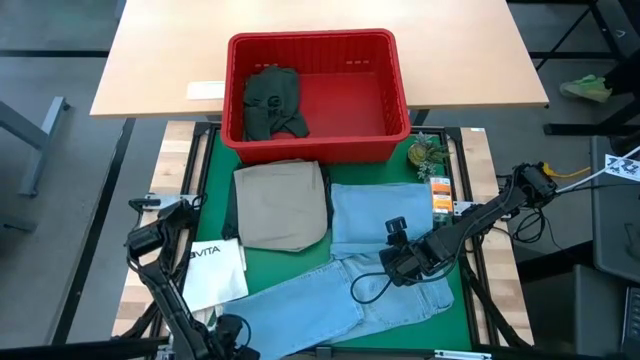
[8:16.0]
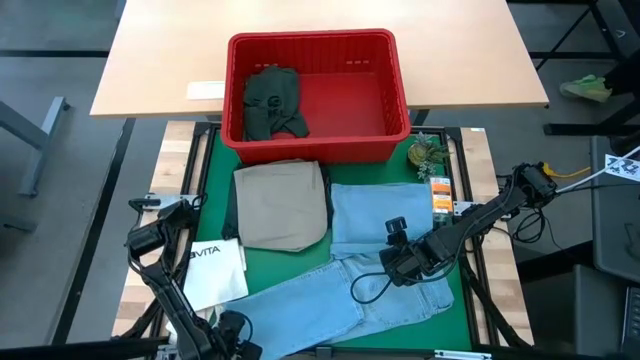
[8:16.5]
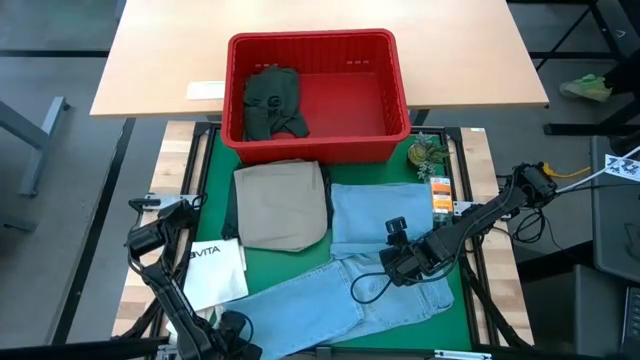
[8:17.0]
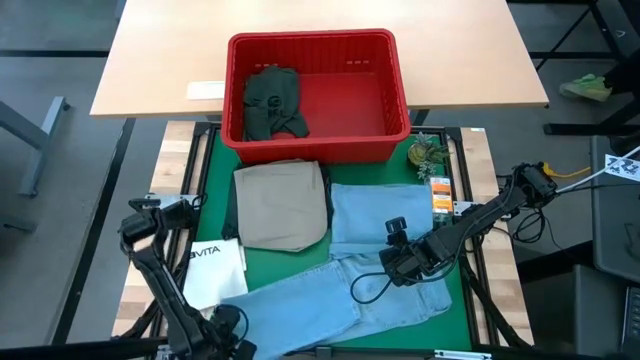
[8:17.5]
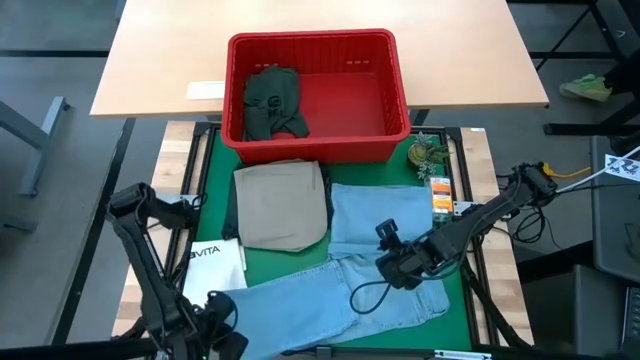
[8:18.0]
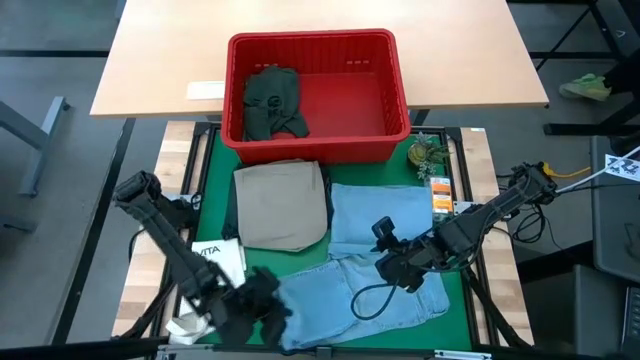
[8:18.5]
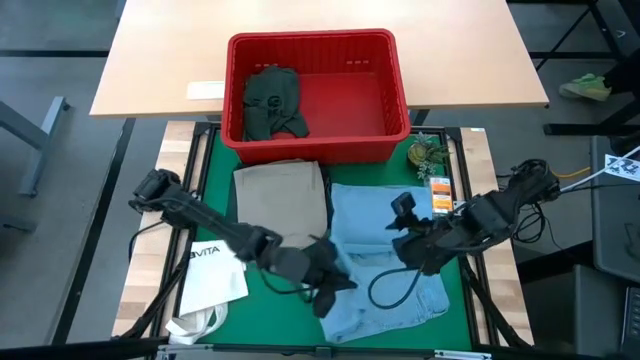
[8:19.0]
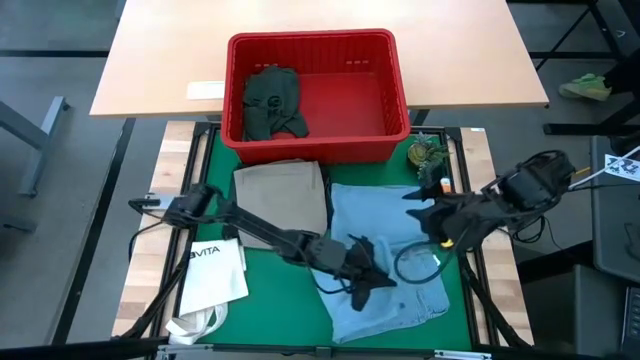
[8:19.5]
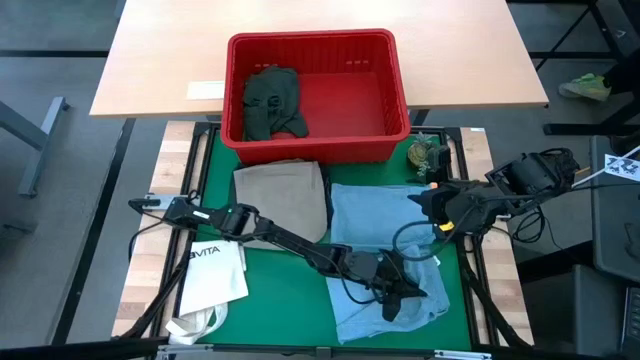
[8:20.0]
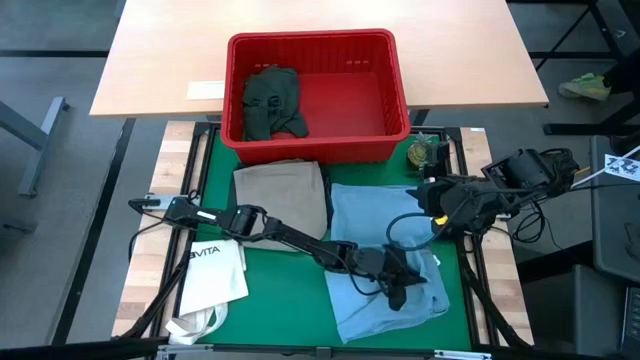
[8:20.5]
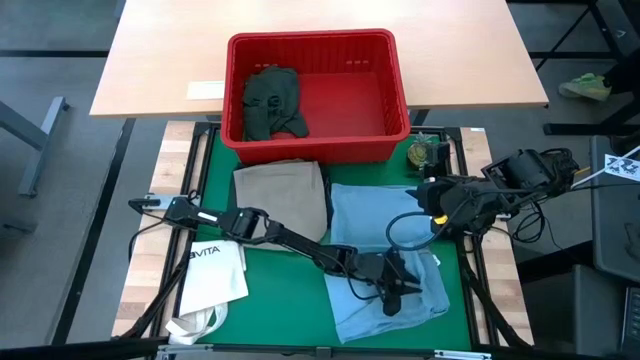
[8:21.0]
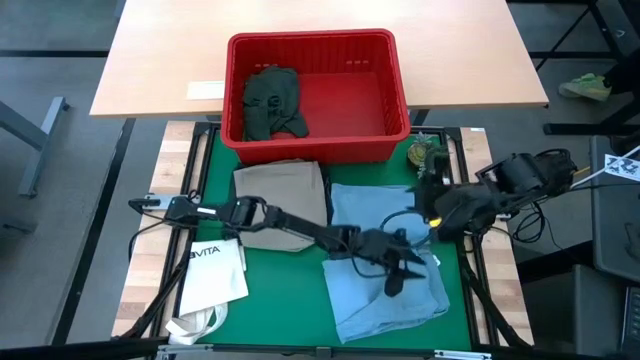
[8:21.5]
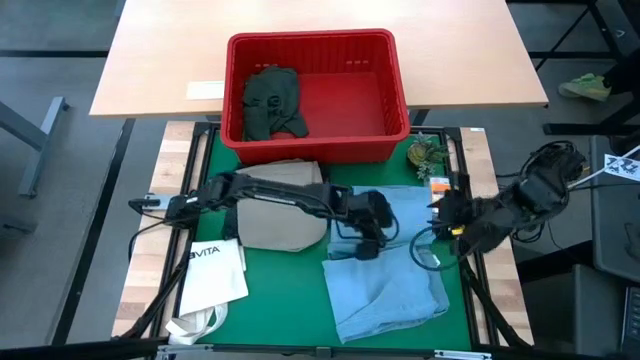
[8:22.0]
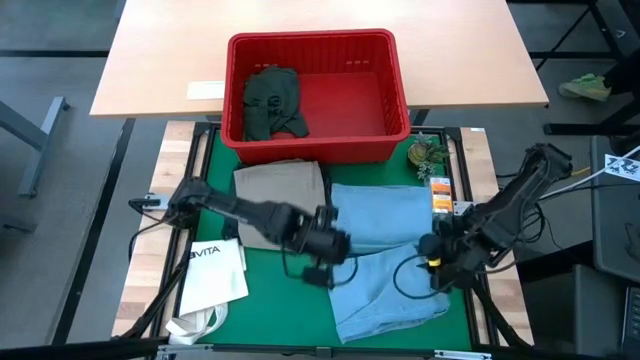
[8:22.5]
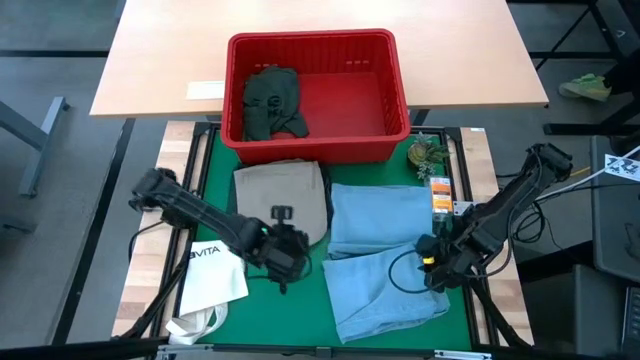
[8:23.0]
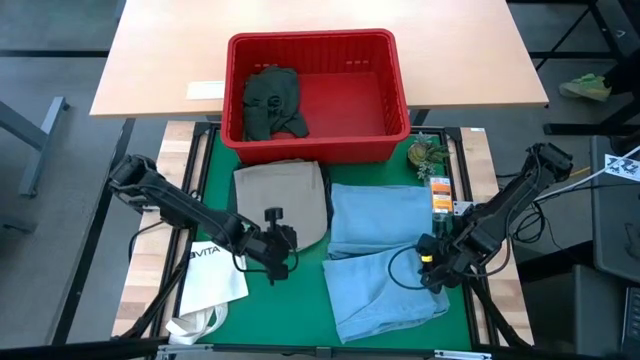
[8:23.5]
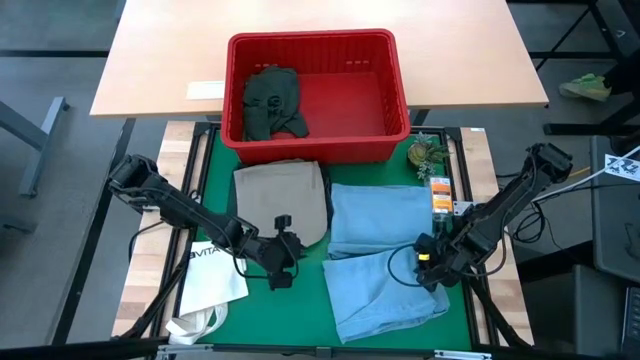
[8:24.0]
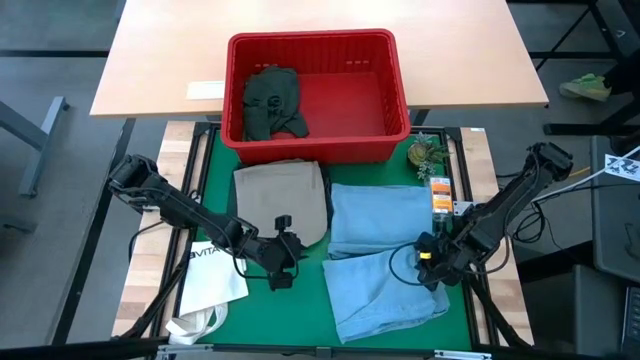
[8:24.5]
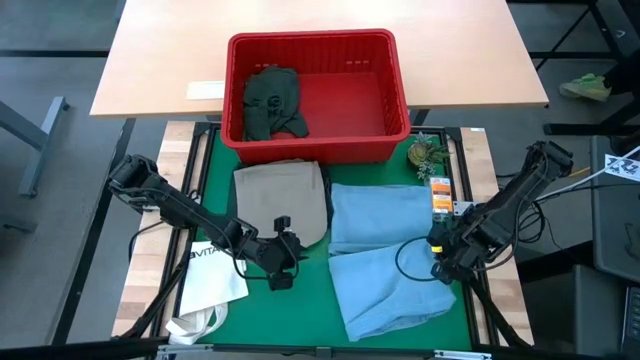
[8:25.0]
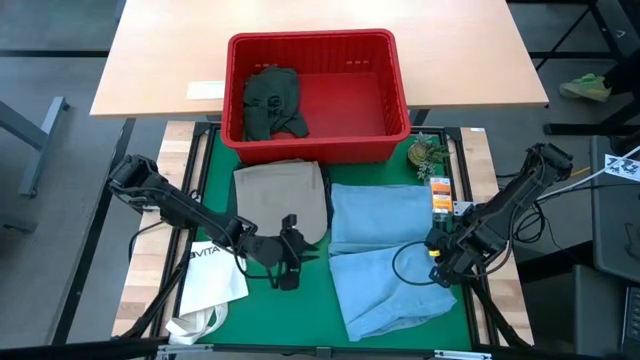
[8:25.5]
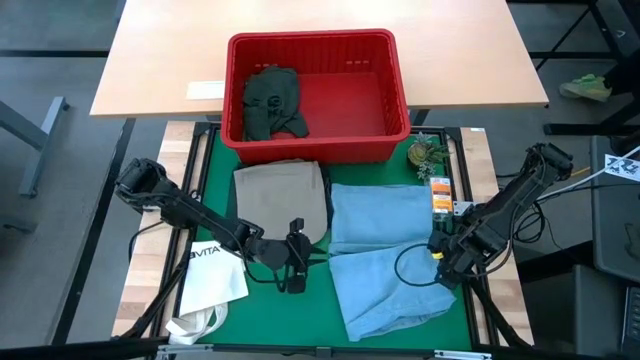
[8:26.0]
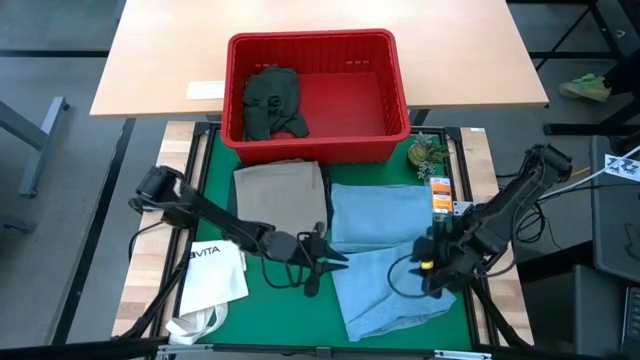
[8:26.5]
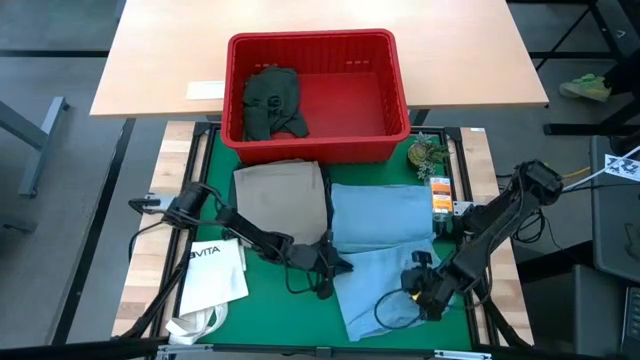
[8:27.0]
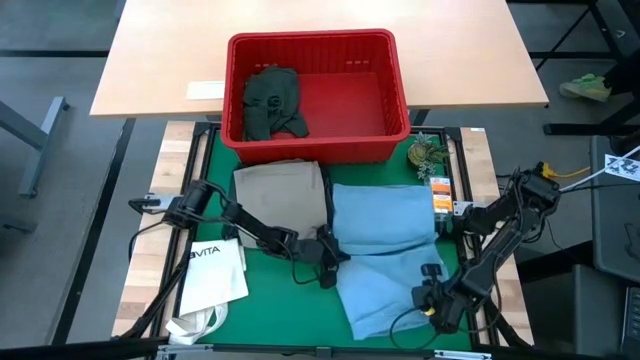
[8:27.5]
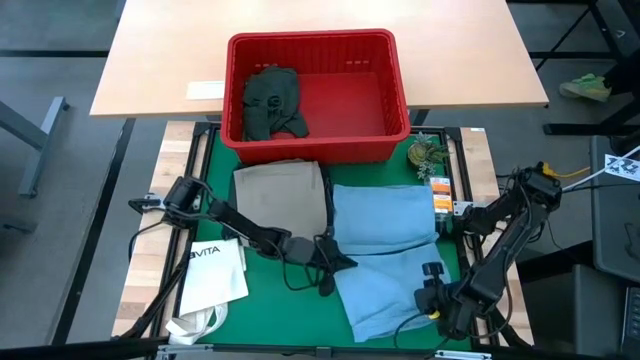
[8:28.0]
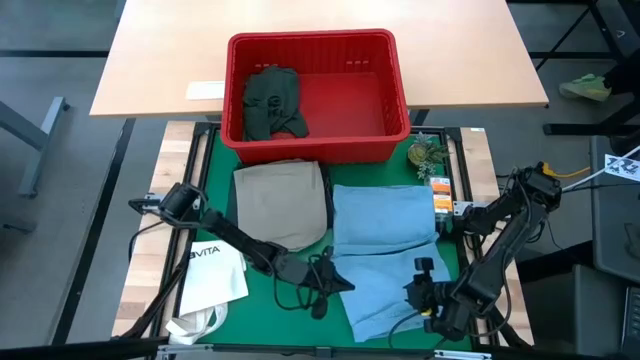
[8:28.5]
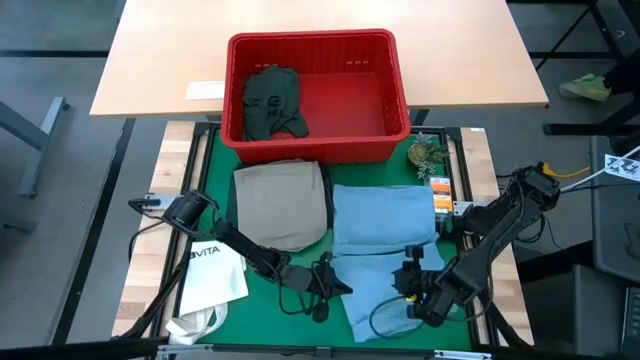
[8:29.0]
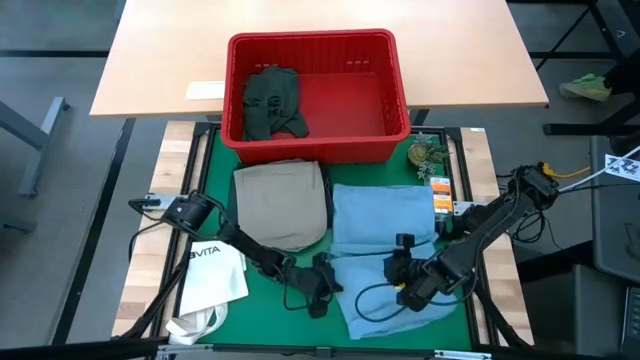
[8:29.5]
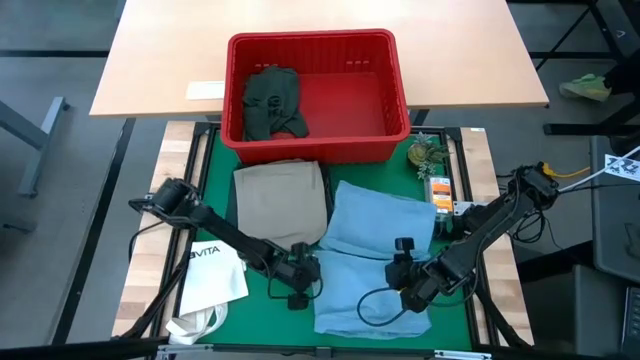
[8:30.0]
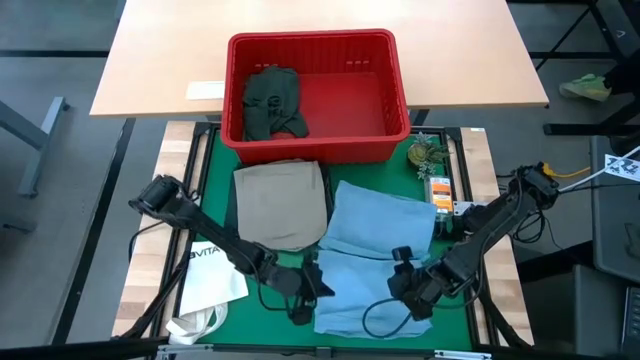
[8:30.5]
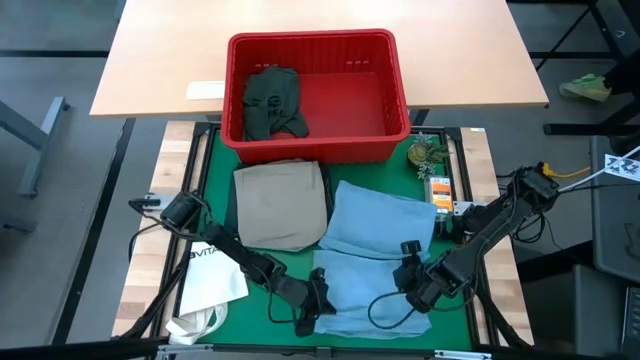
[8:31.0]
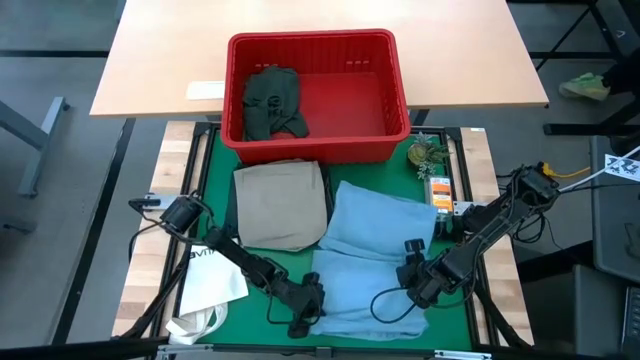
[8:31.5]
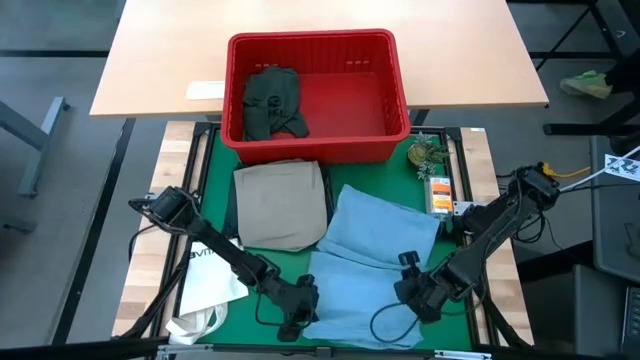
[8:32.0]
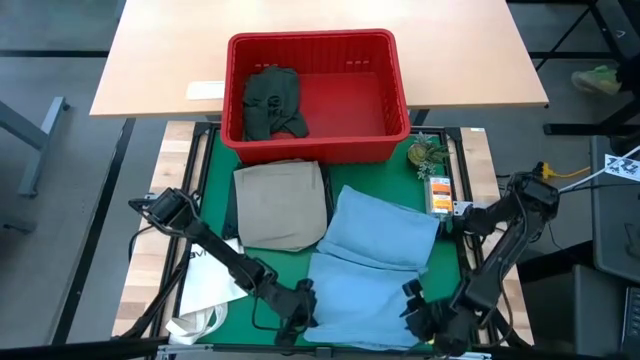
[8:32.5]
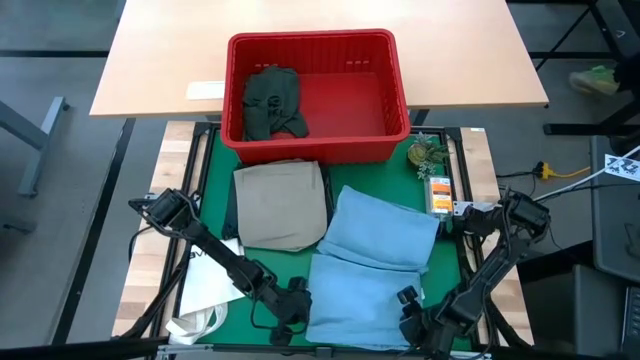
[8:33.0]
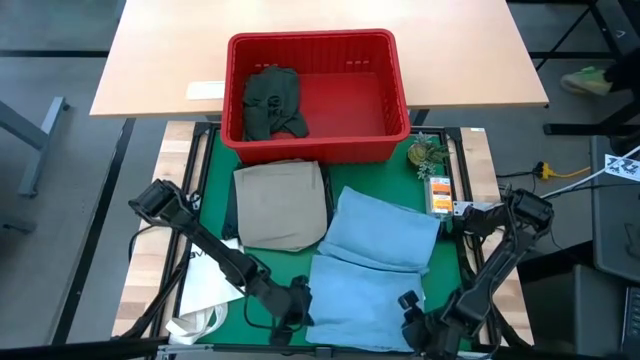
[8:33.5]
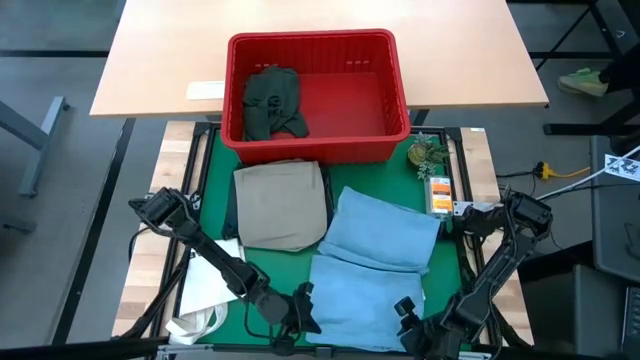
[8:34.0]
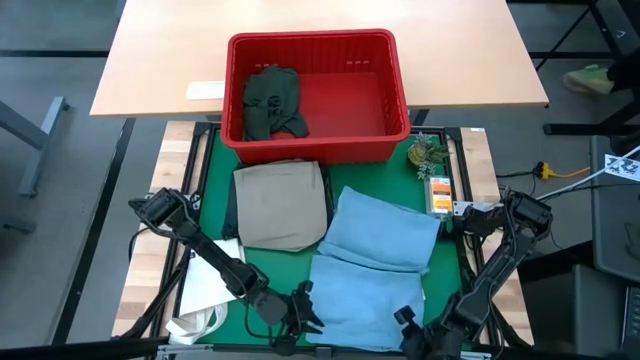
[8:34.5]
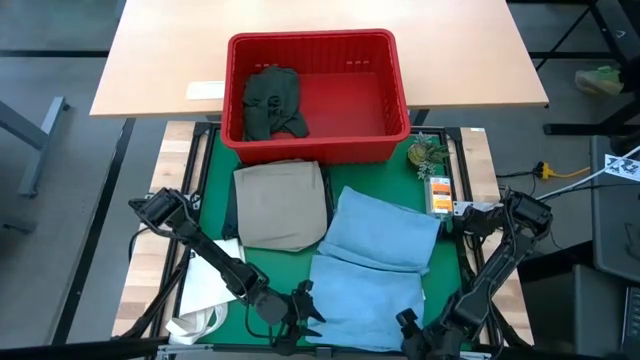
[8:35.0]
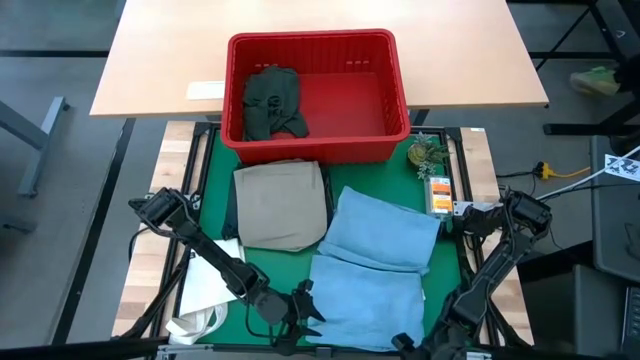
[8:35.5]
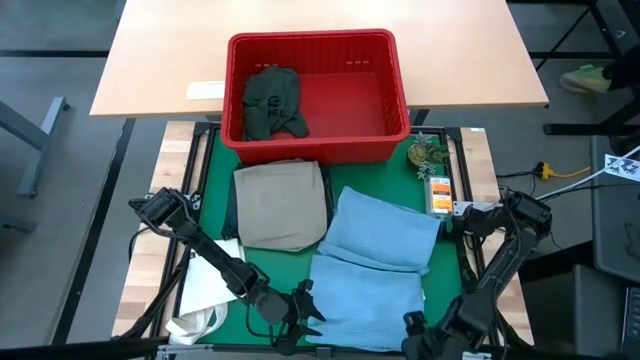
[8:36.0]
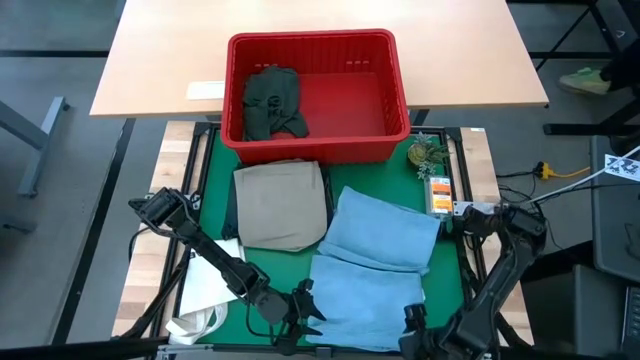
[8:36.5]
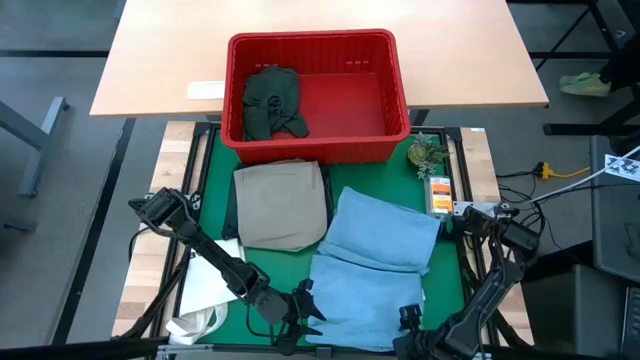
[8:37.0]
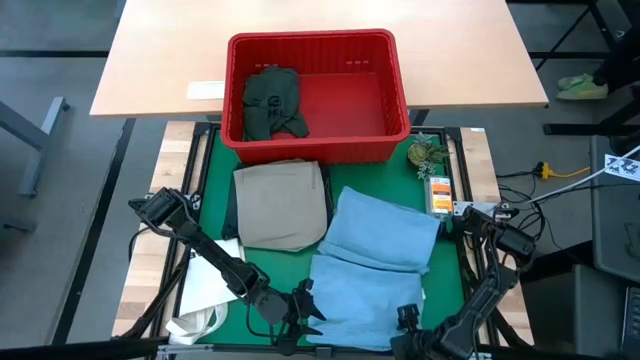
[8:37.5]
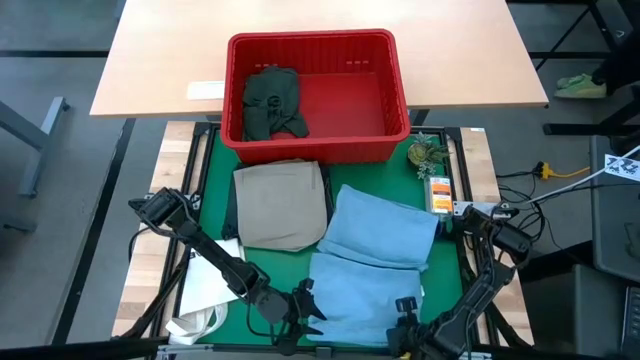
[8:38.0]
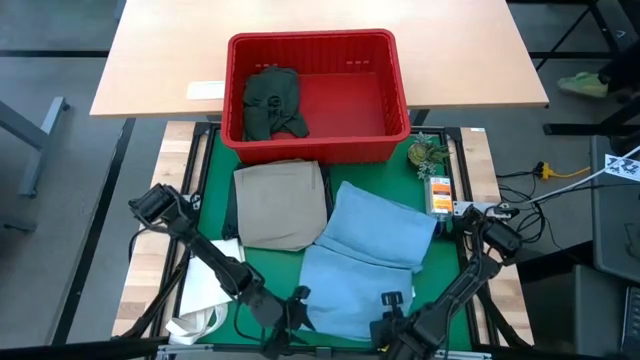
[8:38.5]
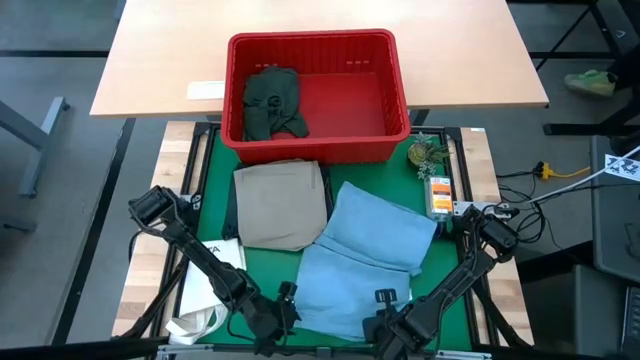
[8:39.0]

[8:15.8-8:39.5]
Task: Fold Laundry from Bin
Fold the light blue pants
